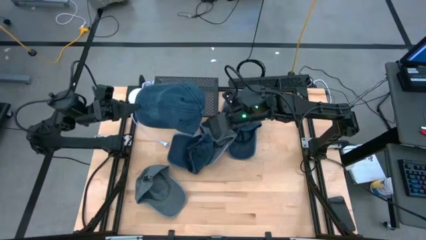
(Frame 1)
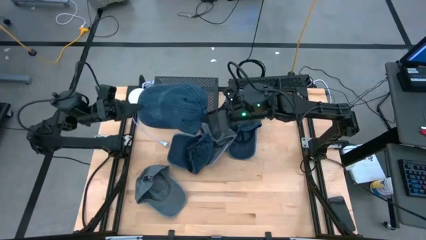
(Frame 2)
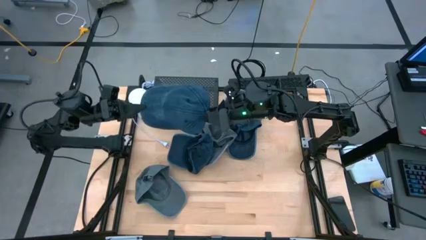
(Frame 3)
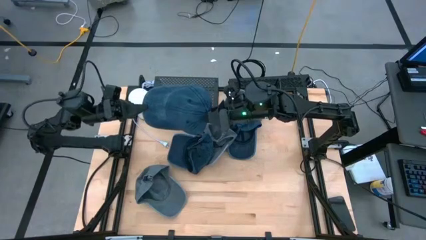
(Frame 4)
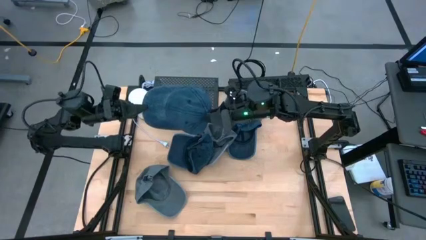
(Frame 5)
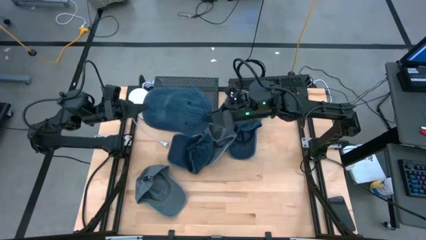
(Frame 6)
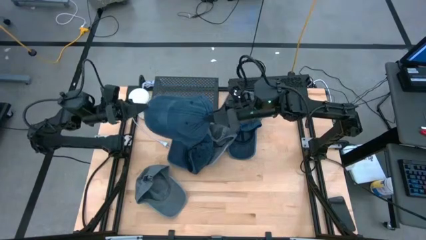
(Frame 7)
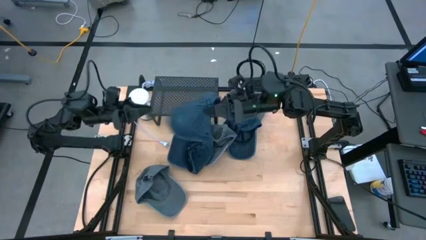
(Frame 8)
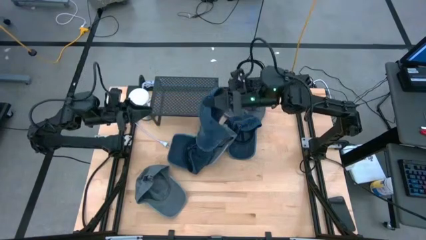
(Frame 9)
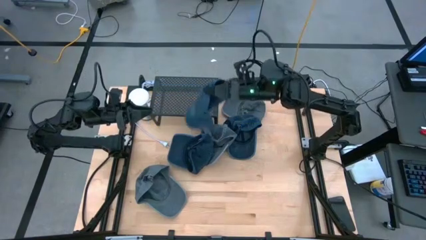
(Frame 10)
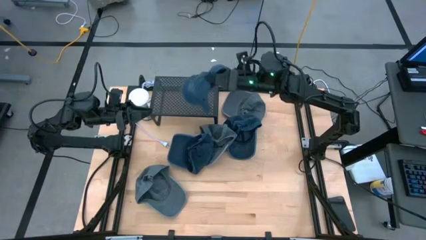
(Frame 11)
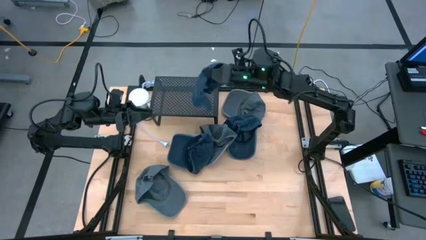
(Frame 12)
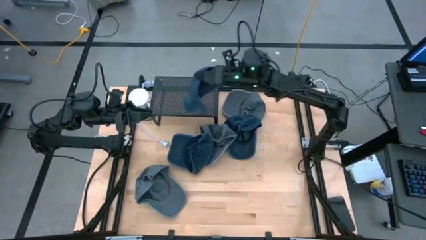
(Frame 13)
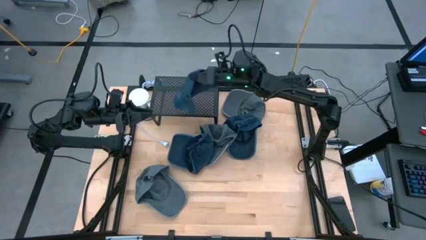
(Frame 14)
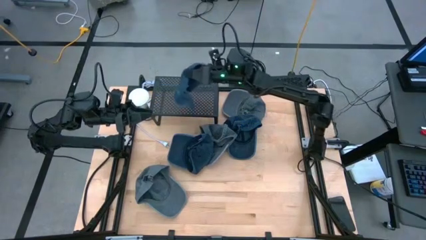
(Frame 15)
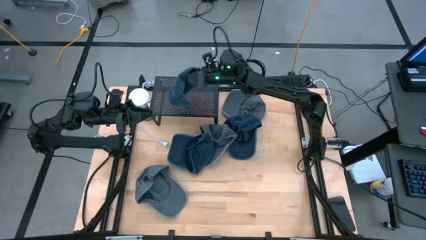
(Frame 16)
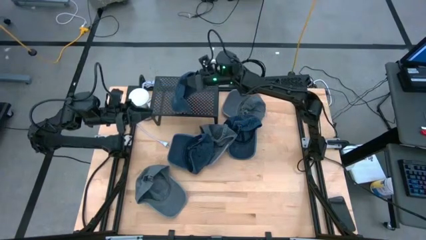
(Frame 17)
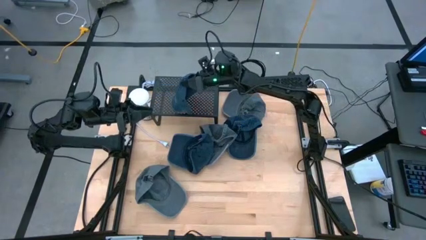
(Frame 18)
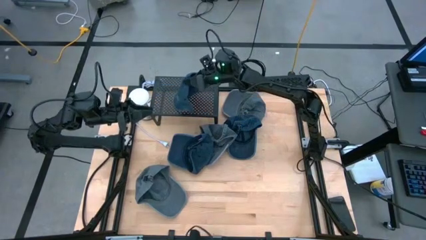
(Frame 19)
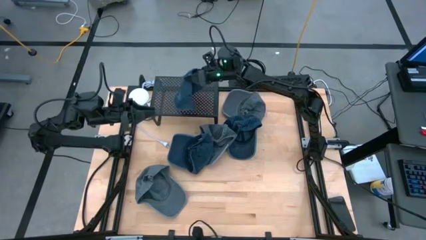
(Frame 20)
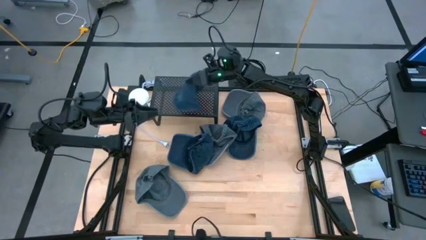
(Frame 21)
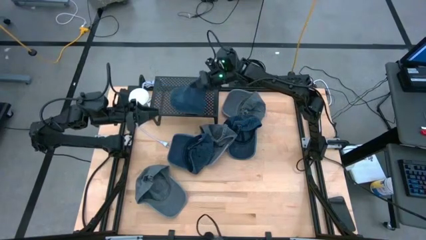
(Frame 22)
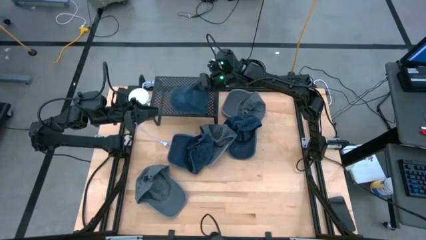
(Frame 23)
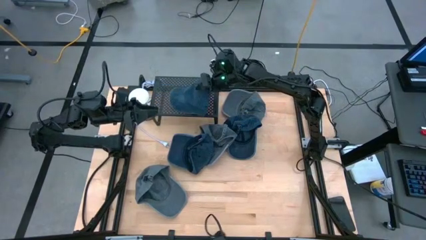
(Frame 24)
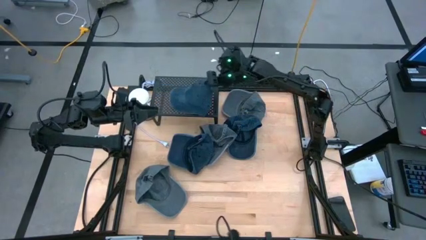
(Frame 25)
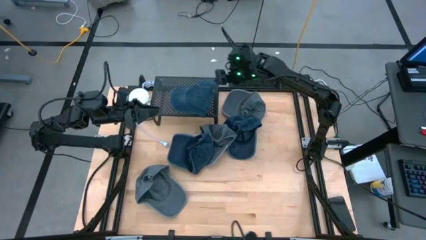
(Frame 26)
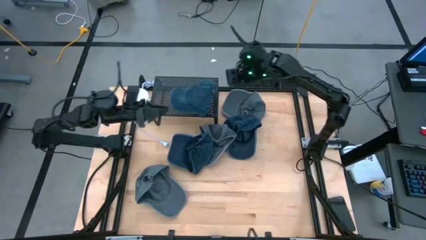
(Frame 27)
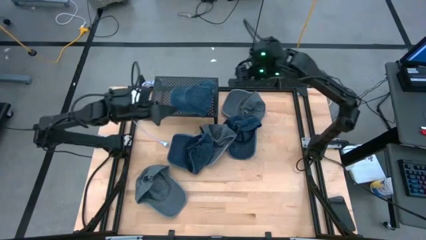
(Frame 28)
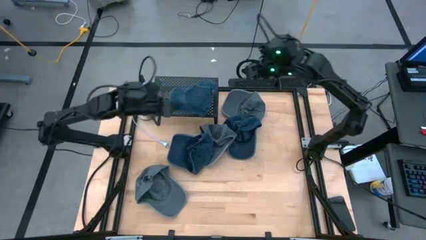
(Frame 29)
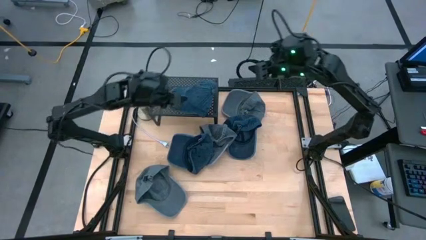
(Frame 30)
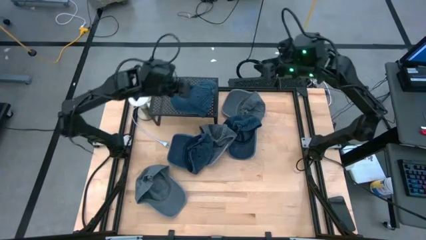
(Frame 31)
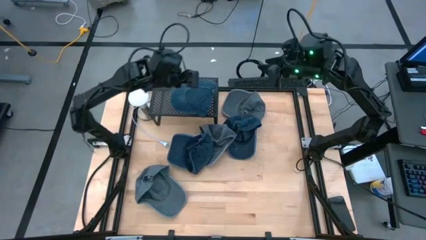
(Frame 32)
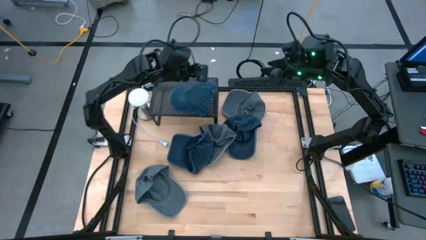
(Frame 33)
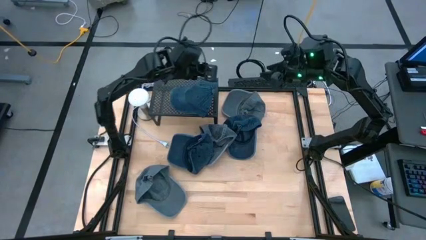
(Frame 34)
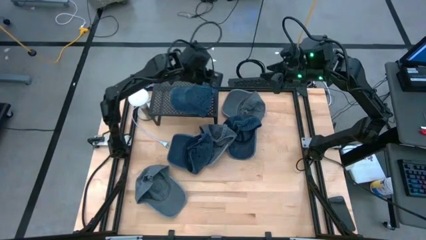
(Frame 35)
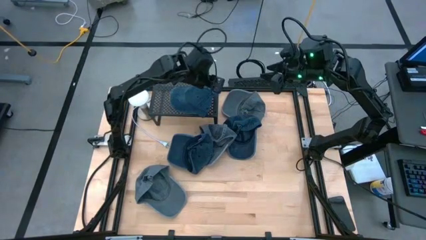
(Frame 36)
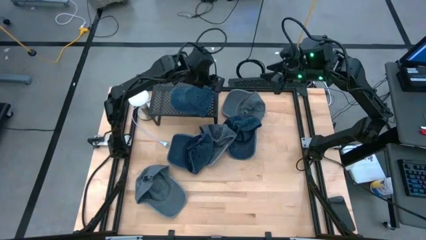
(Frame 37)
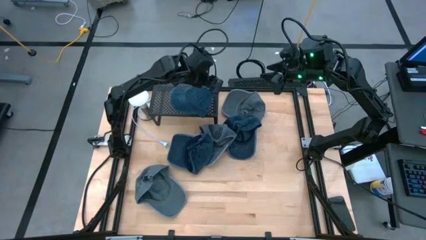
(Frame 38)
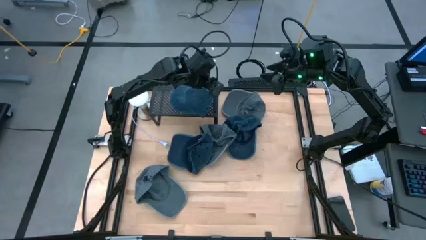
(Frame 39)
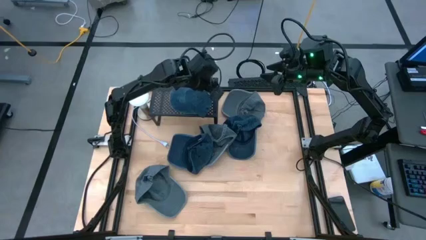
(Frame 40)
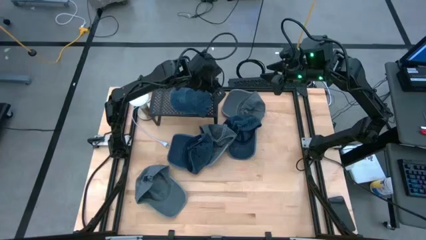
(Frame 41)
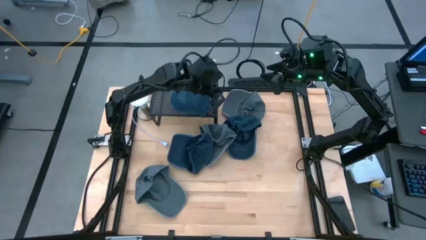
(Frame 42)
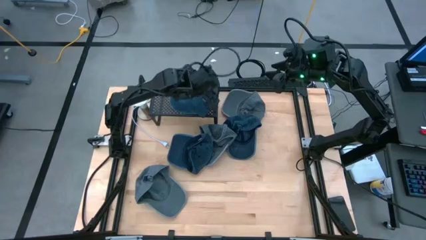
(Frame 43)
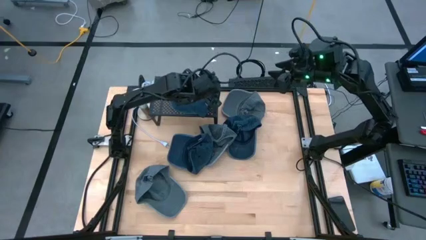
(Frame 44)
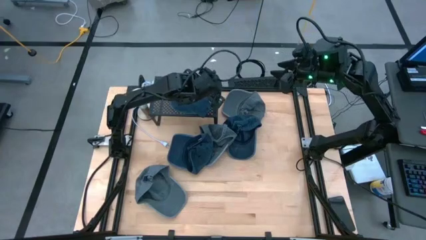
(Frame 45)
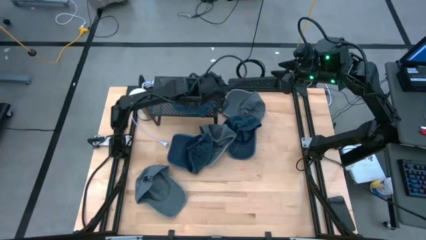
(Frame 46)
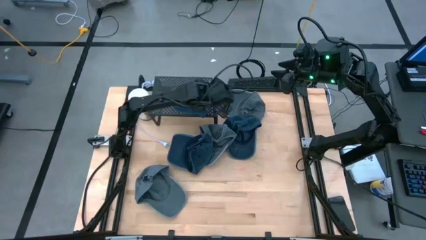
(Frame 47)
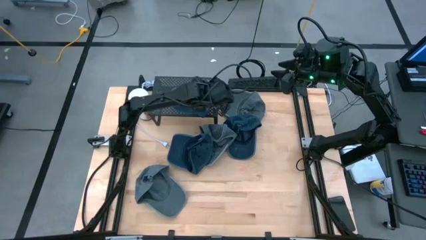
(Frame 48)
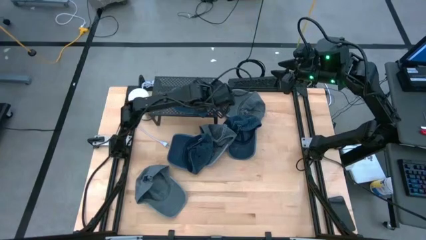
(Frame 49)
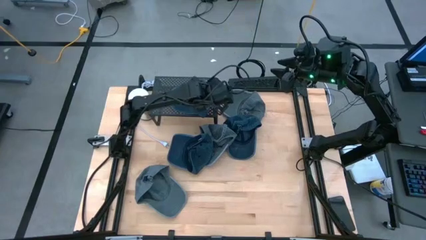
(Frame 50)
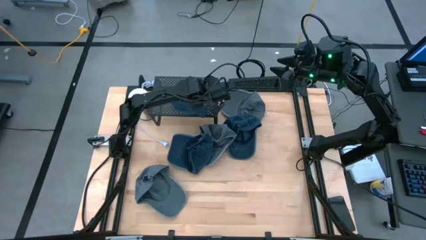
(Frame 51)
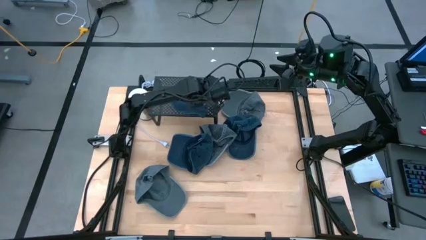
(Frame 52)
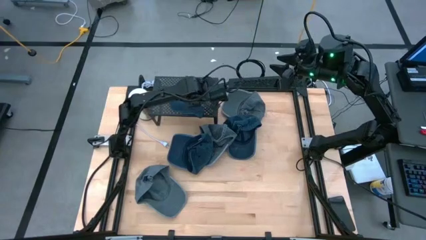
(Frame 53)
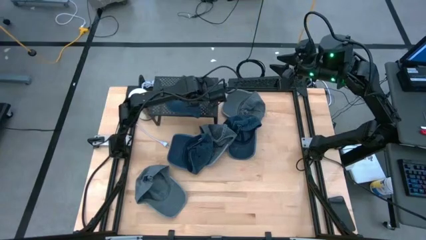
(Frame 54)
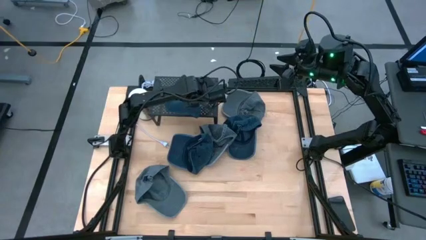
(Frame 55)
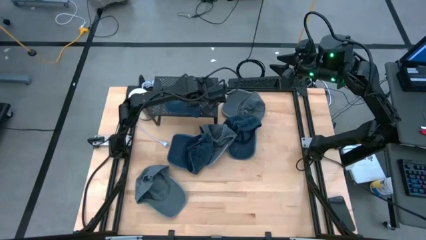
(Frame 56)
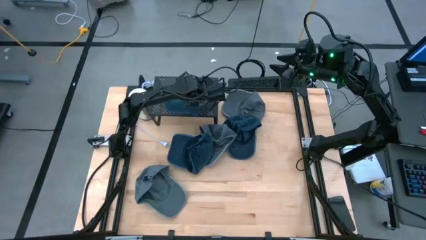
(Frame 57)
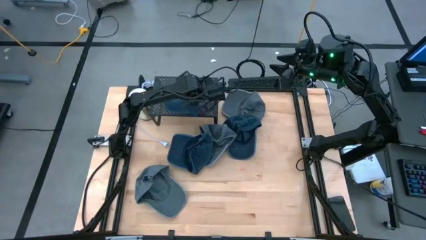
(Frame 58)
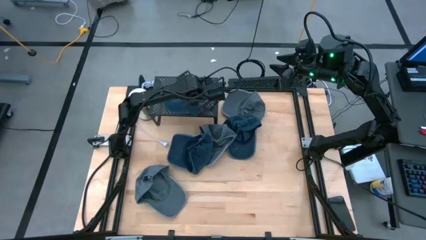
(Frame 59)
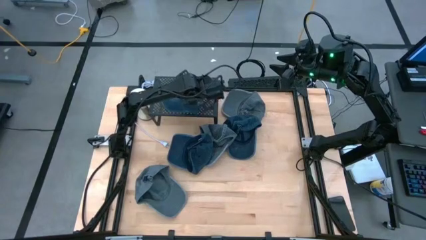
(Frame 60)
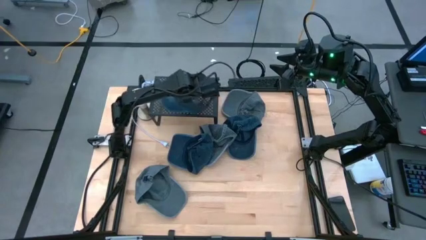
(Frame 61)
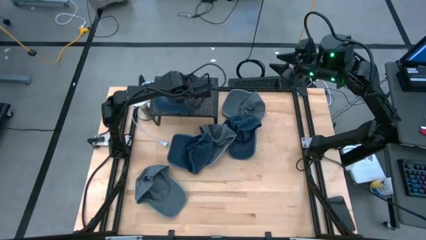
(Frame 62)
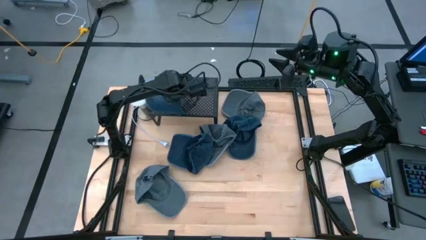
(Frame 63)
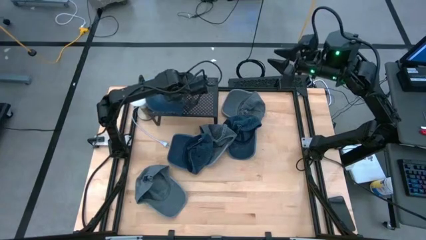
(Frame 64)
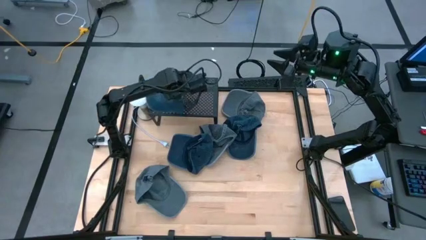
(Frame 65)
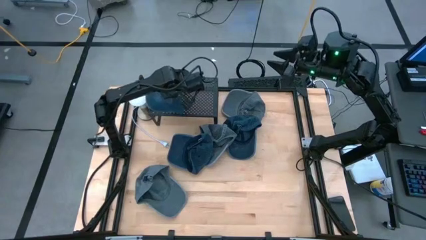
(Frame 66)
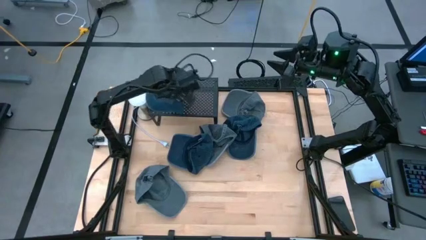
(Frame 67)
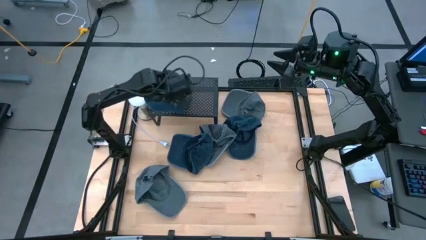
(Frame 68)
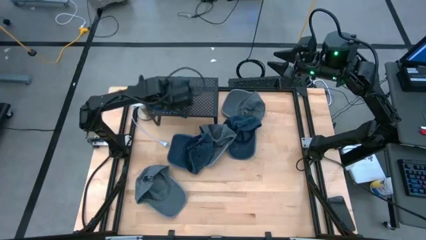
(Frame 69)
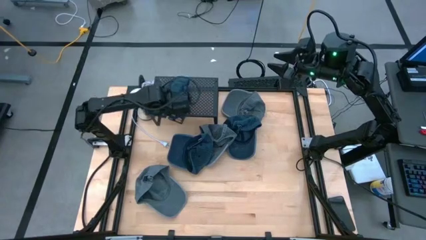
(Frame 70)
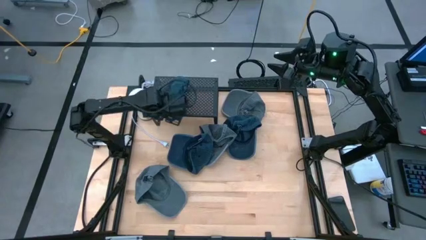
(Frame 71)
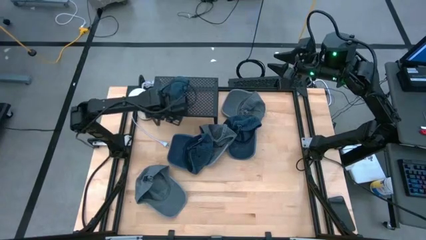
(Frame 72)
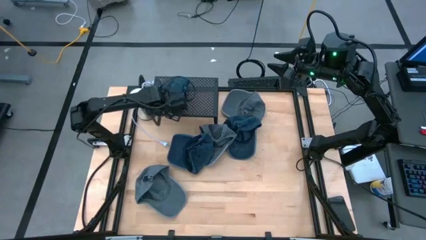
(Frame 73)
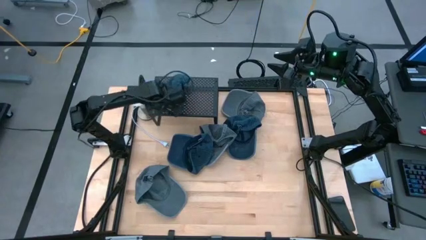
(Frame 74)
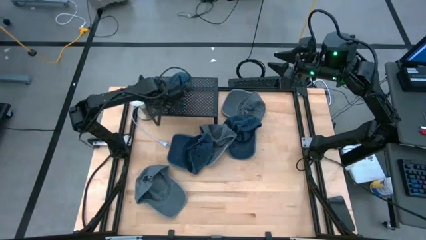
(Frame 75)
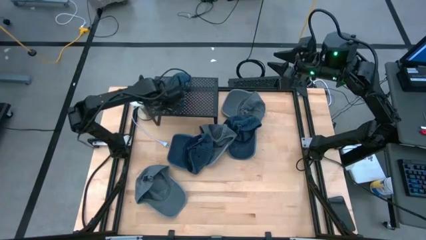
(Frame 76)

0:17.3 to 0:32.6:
Task: Pick & Place hat
Put the top right blue cap on the shelf
